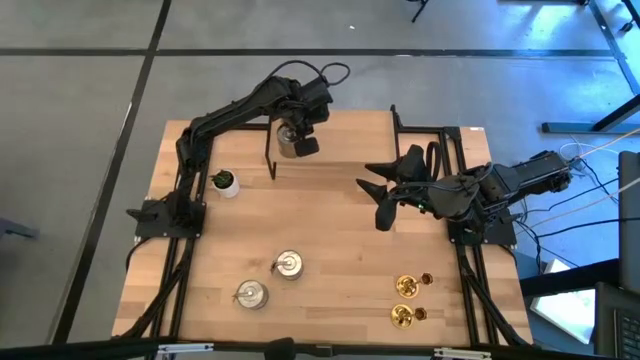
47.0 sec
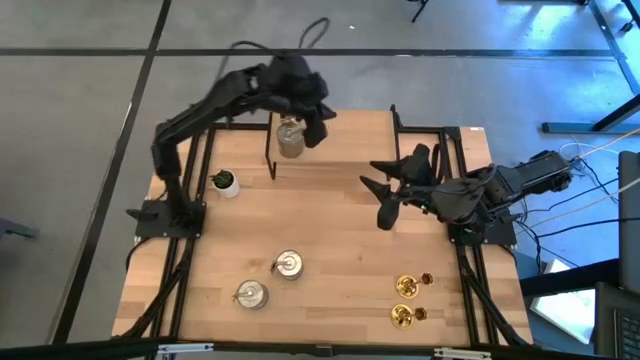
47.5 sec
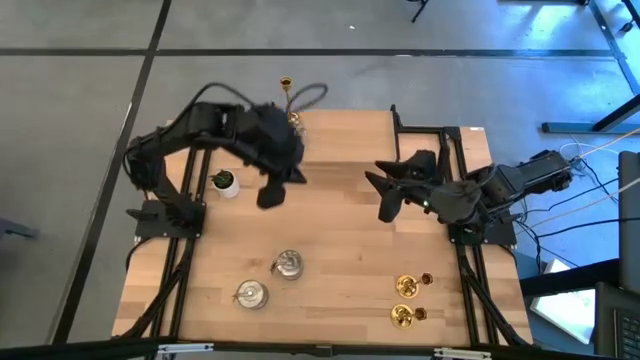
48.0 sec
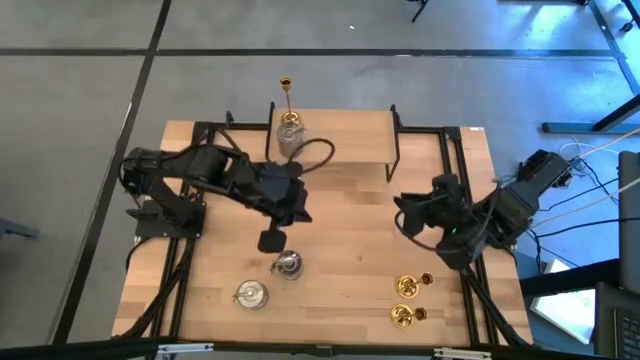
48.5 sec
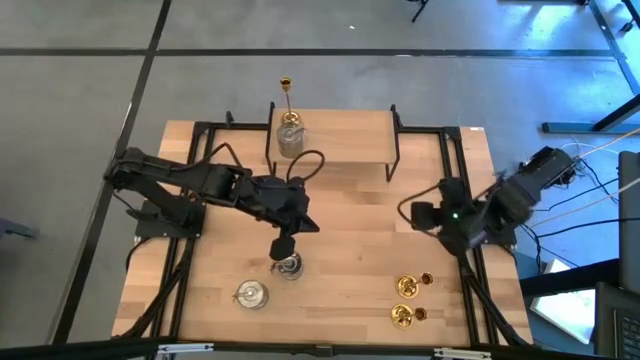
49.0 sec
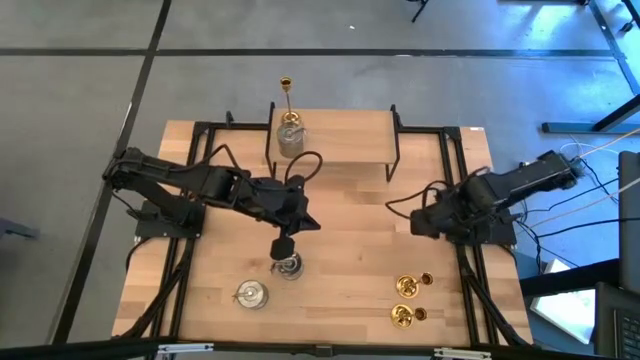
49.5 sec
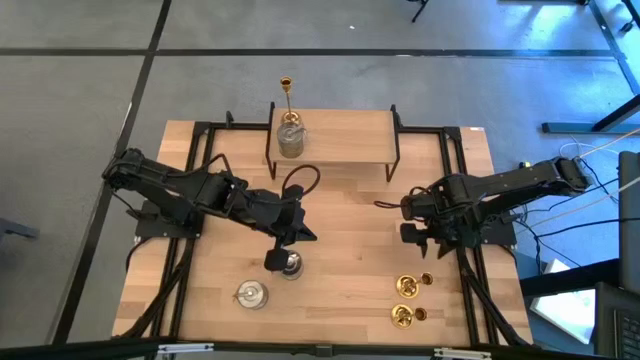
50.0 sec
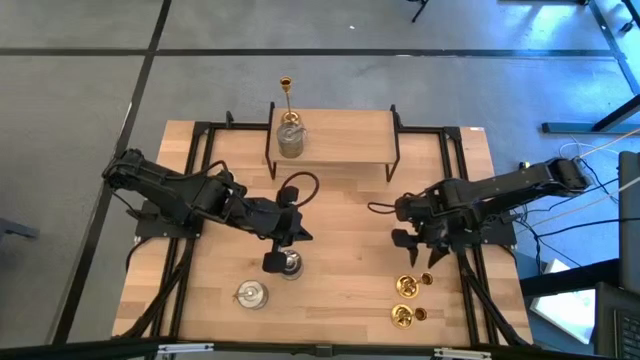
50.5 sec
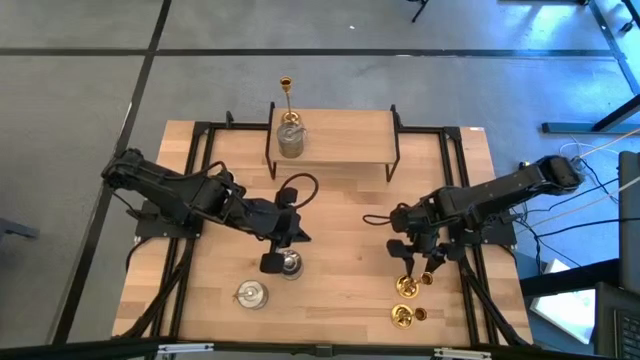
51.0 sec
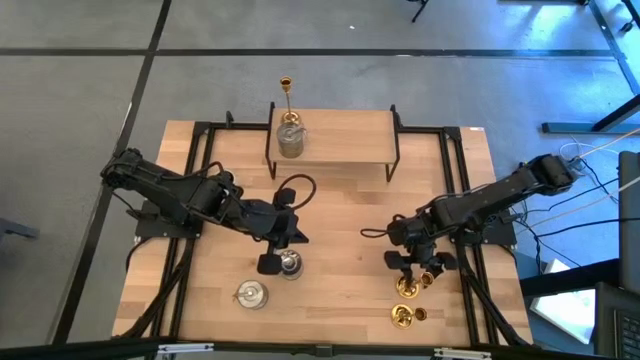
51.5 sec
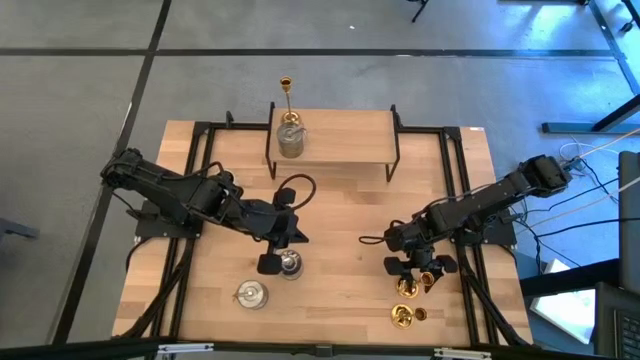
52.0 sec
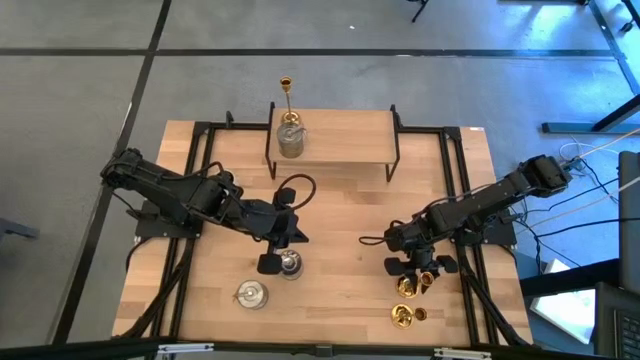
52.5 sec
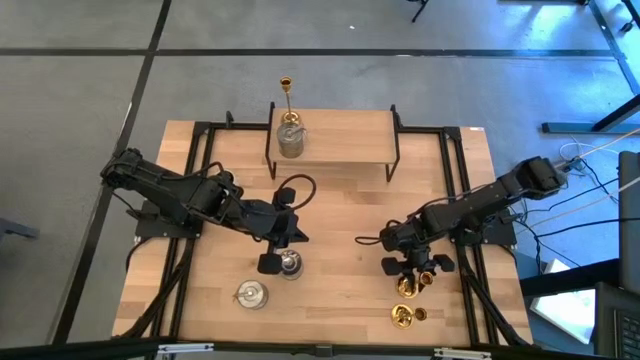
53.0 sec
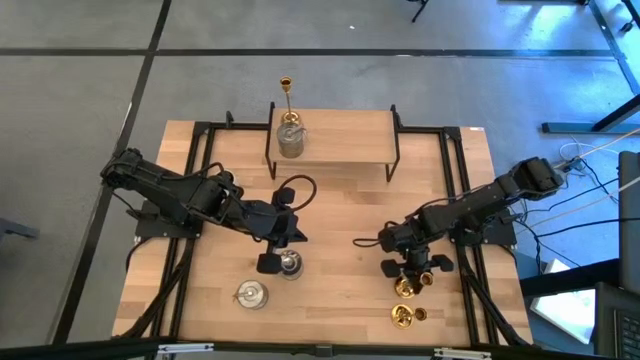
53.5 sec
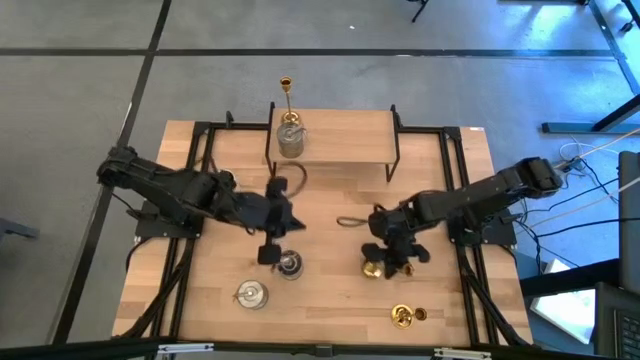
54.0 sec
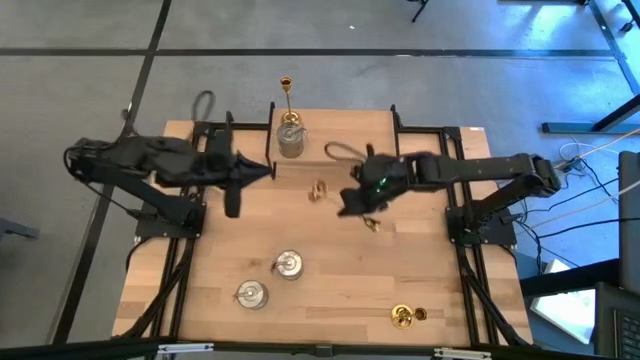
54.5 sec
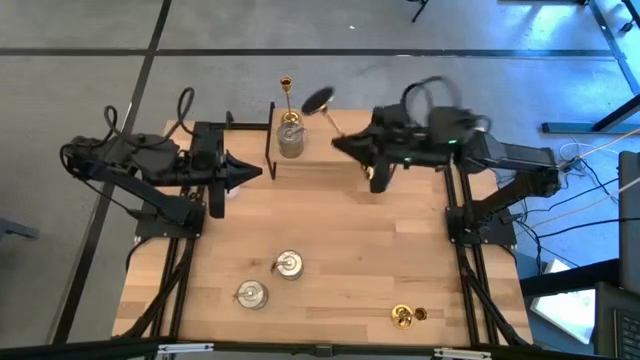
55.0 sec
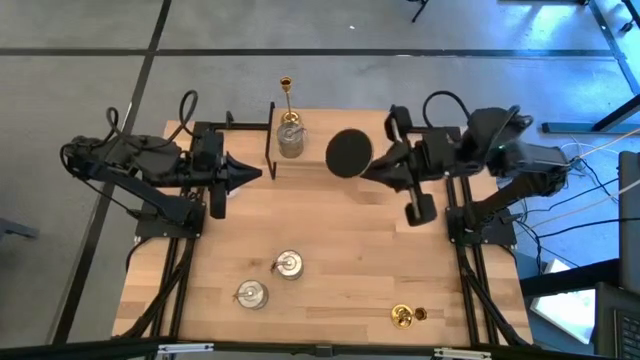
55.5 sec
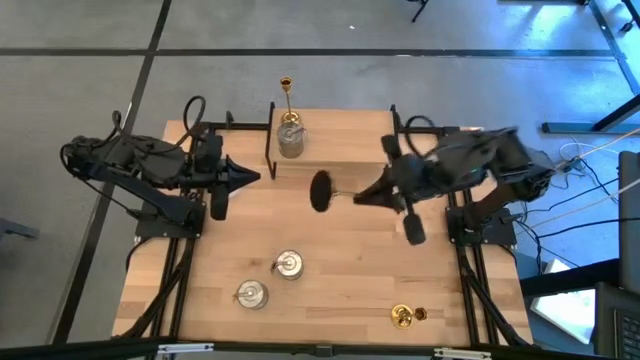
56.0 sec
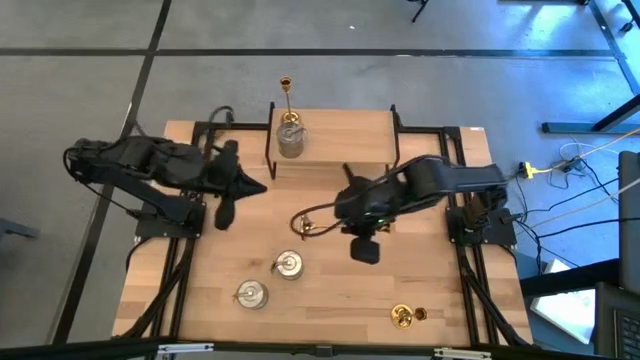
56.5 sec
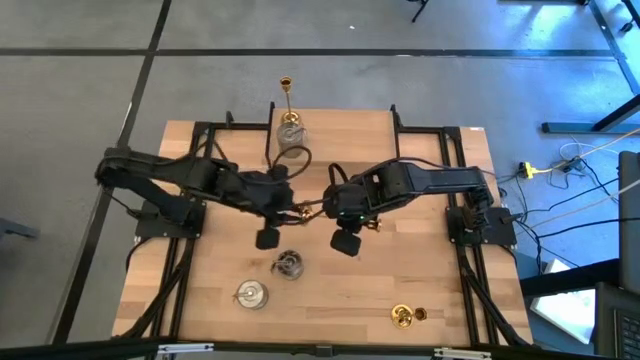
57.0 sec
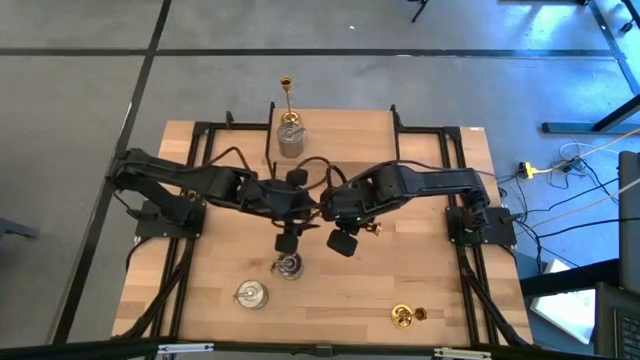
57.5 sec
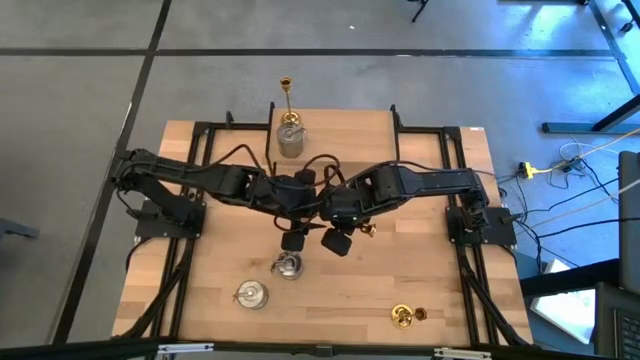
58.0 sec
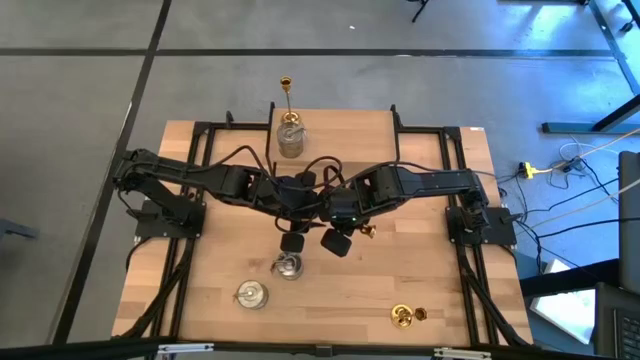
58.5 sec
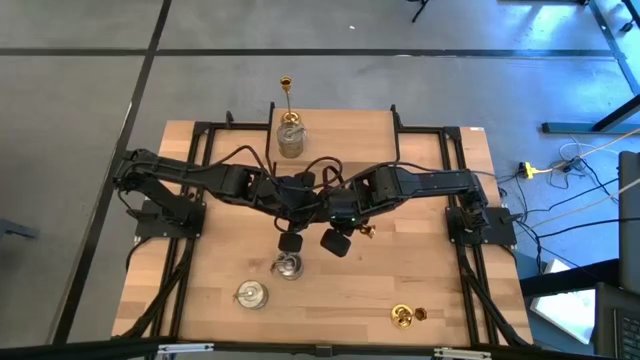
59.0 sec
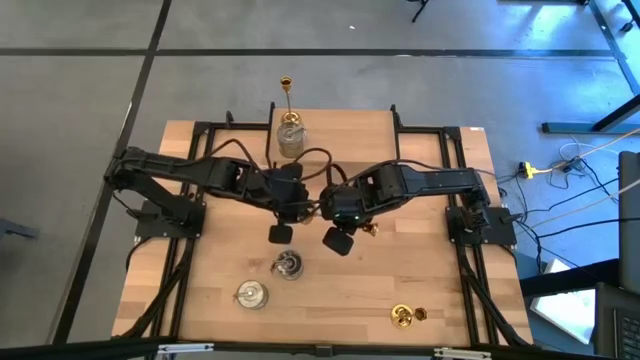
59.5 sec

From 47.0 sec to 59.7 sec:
Task: Pick & Place candle stick holders
Put the top gold candle holder on the shelf aligned with the other gold candle holder

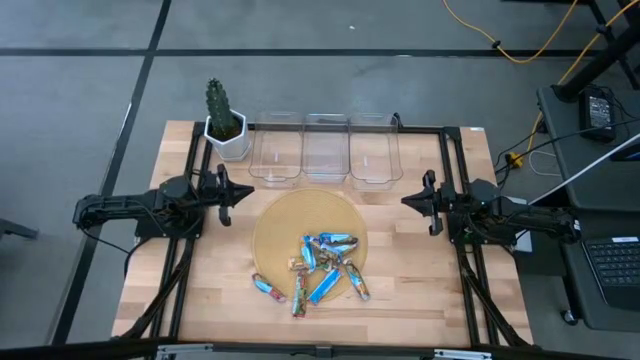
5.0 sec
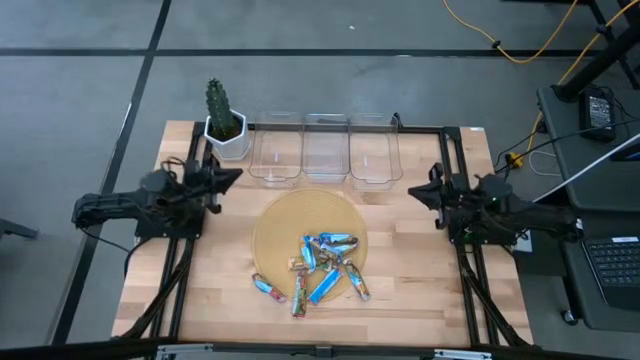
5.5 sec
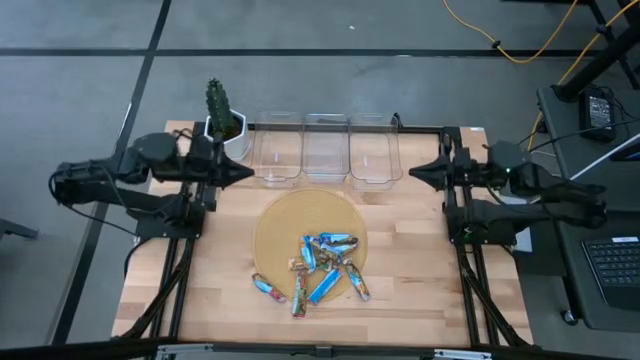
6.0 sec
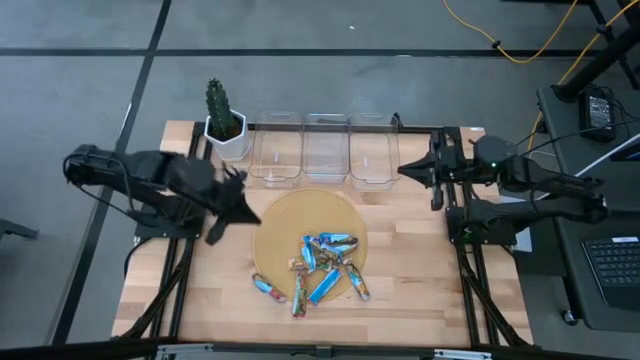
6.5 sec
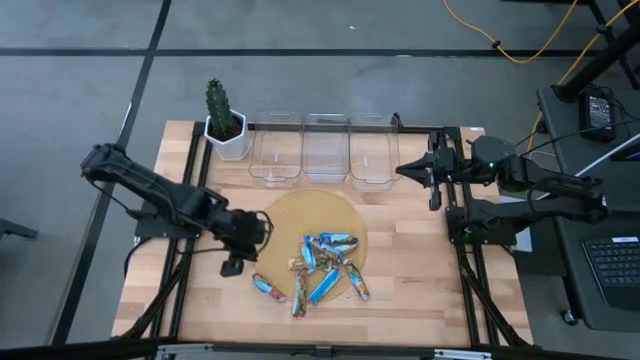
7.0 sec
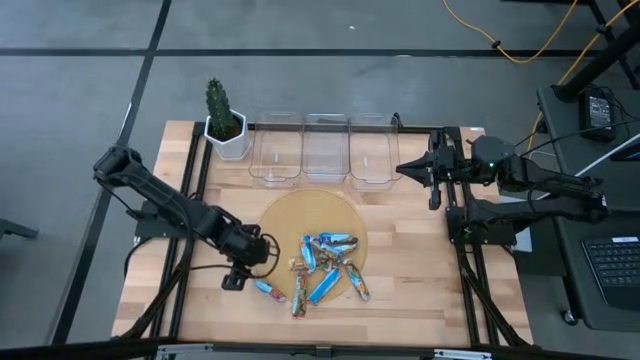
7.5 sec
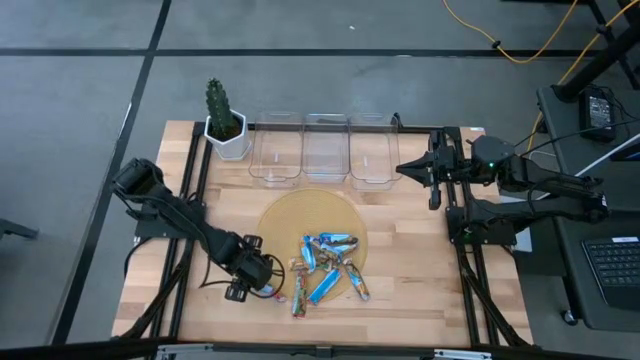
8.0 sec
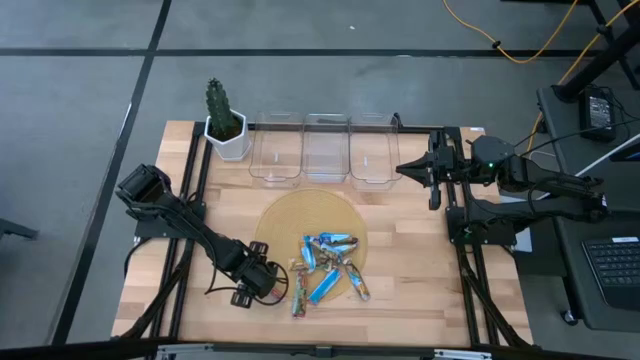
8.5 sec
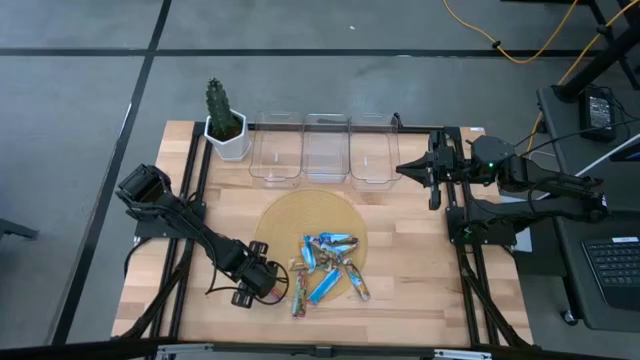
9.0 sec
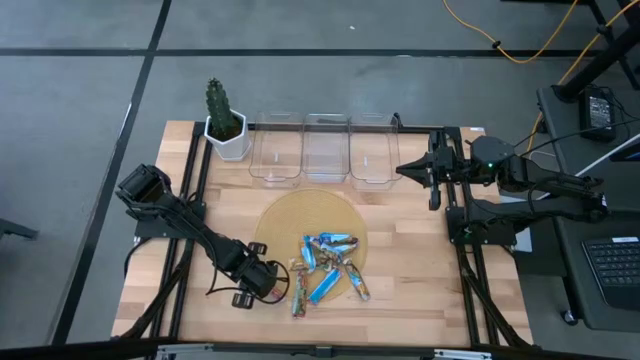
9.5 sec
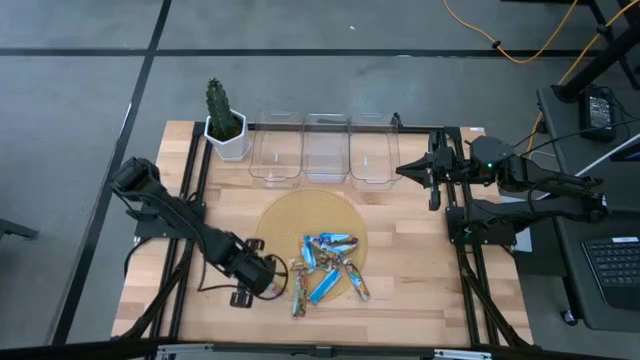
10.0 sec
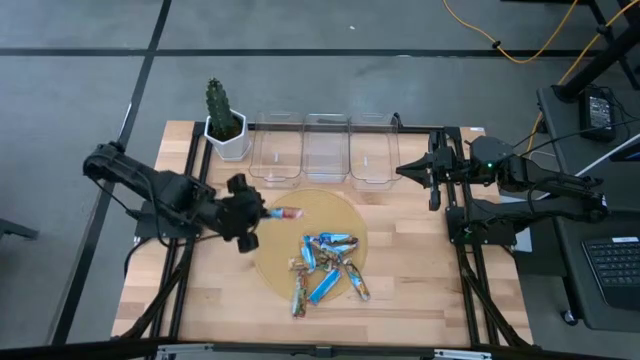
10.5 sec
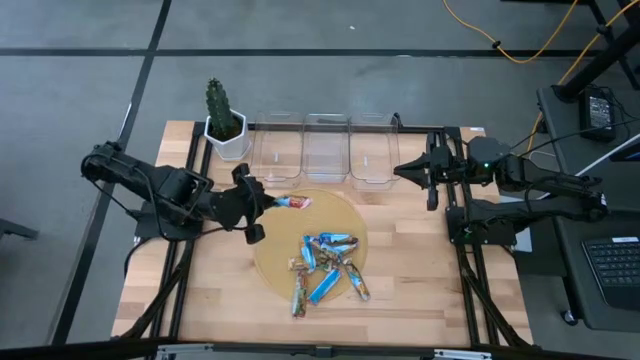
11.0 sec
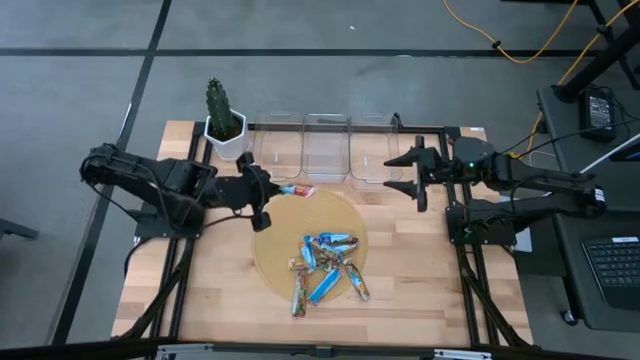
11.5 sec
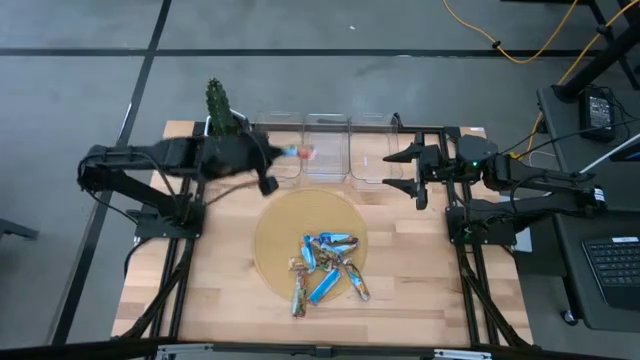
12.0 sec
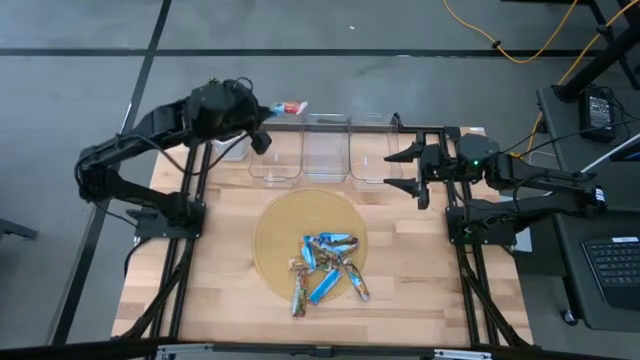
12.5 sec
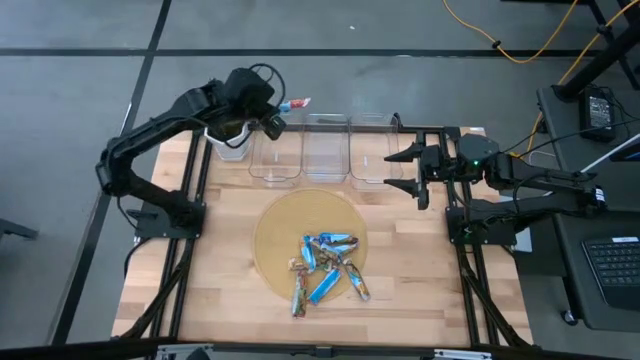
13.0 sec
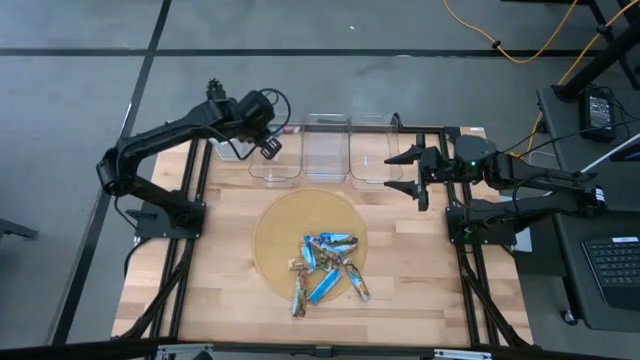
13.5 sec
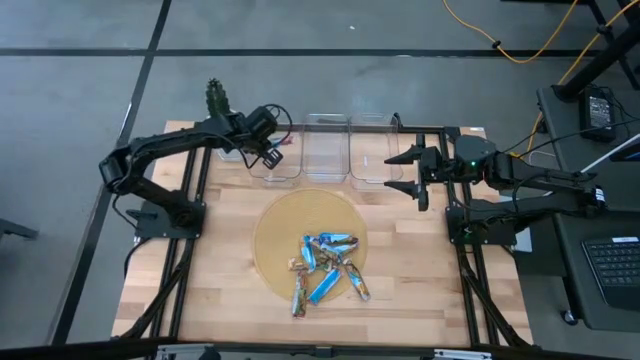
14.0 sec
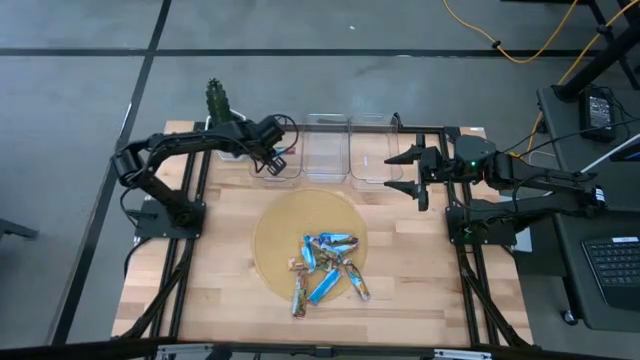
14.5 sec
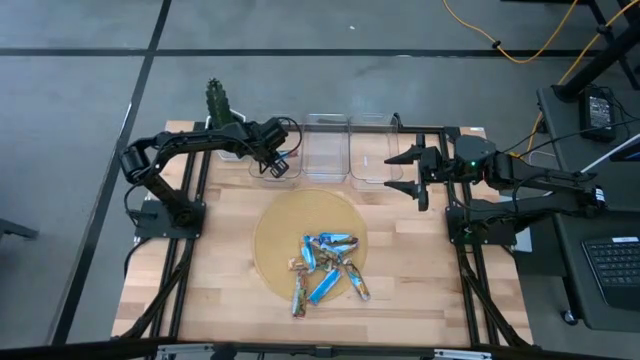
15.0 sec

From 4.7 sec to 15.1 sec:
Task: Pick and place Granola Bars by type
Put the red granola bar into the left transparent bin
